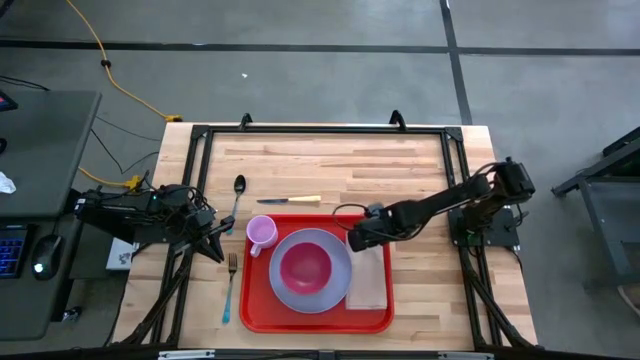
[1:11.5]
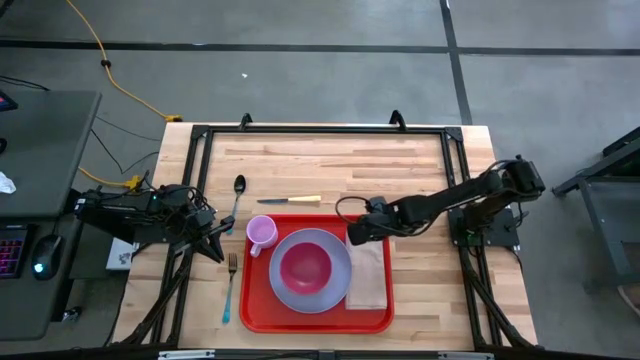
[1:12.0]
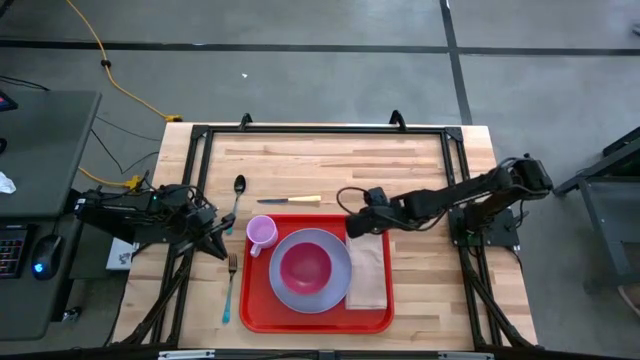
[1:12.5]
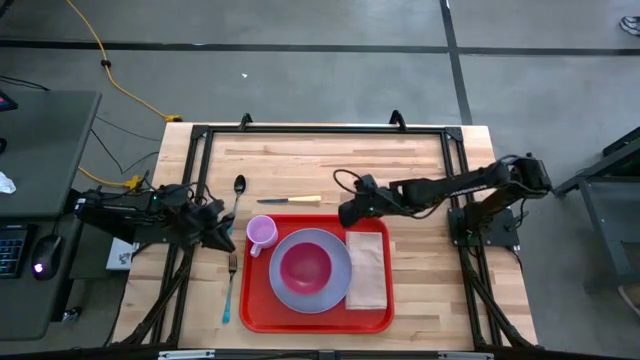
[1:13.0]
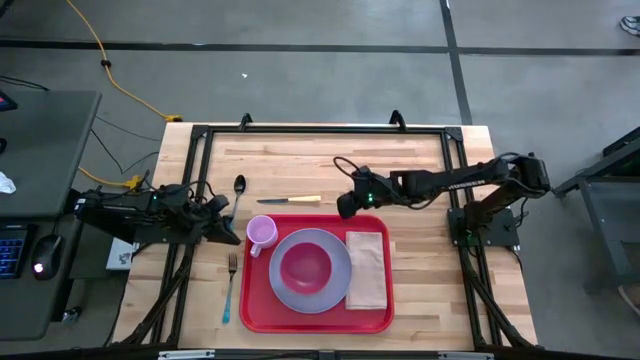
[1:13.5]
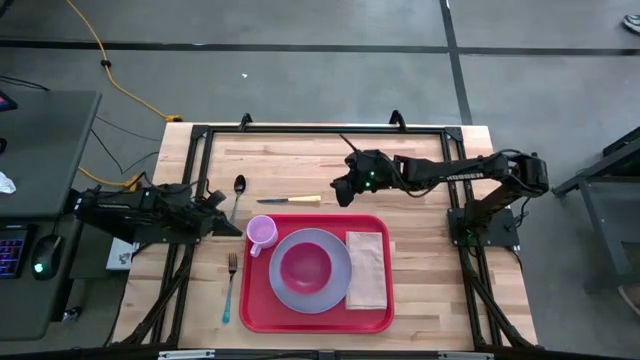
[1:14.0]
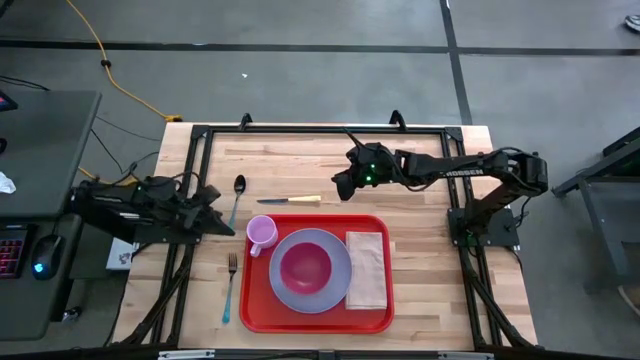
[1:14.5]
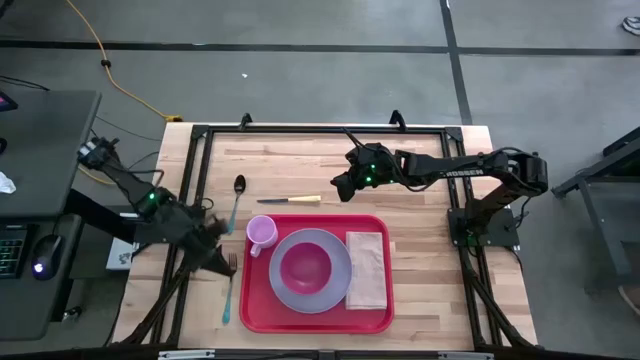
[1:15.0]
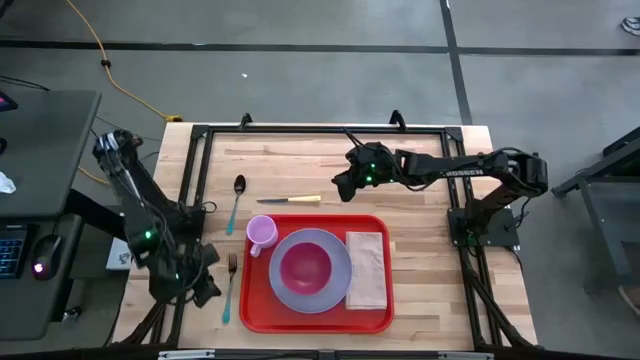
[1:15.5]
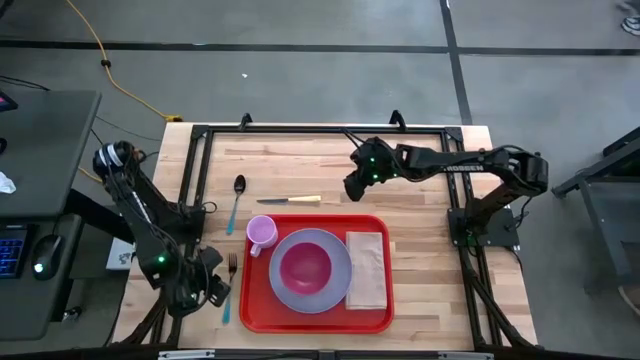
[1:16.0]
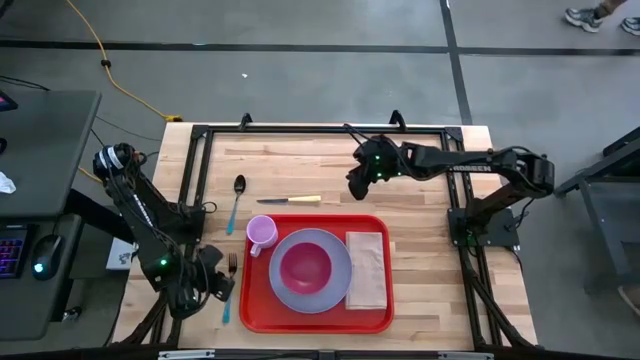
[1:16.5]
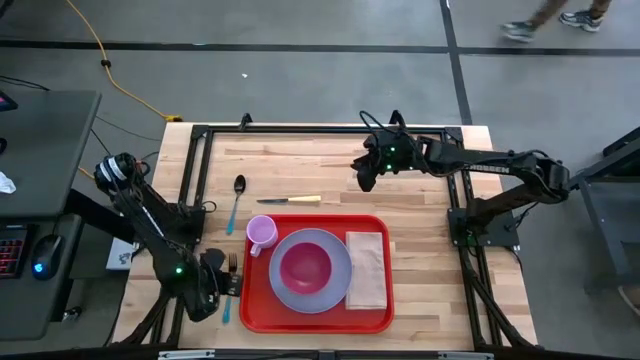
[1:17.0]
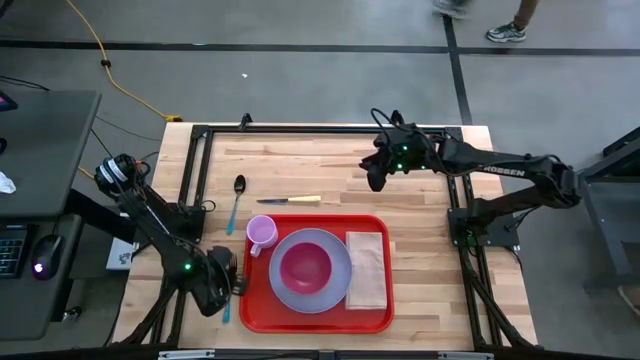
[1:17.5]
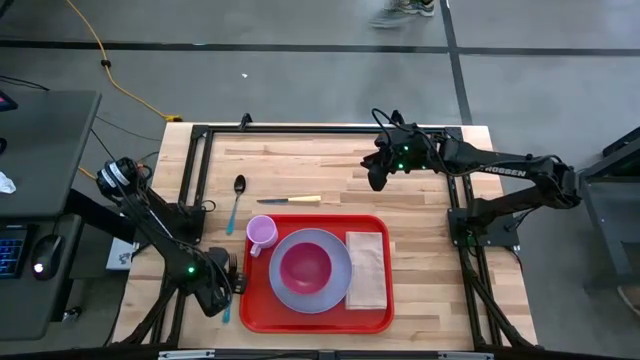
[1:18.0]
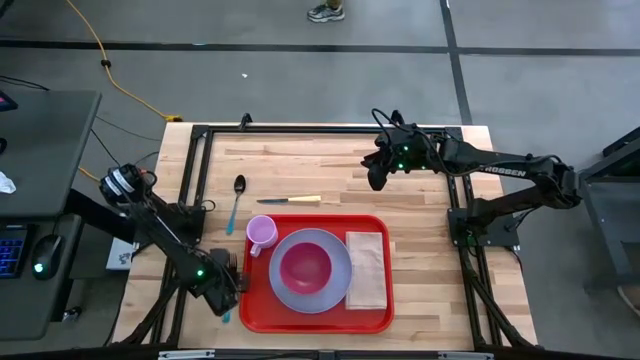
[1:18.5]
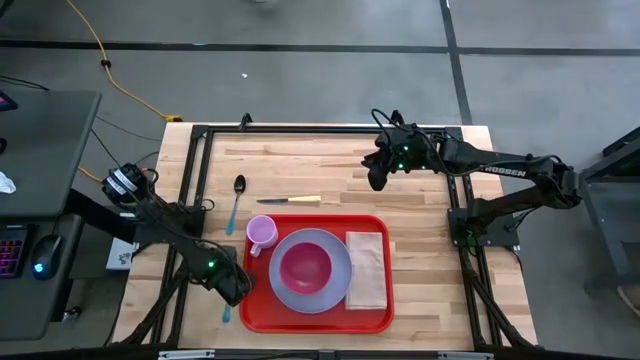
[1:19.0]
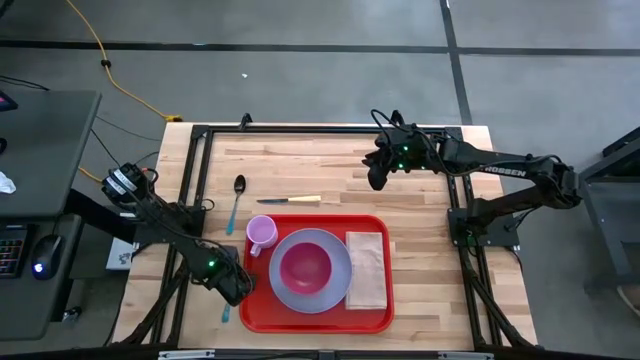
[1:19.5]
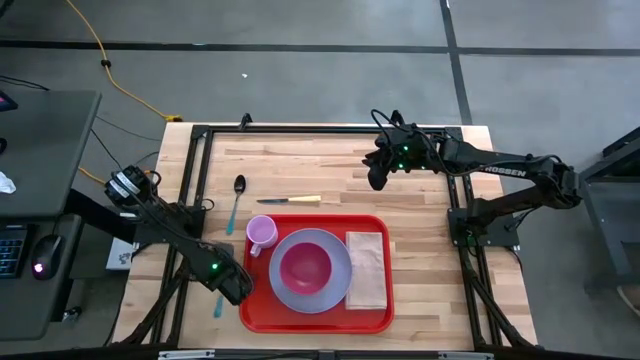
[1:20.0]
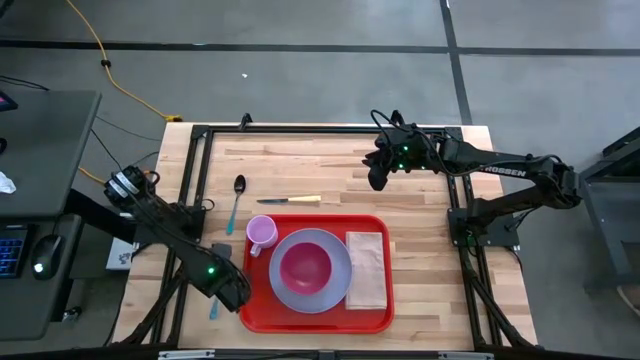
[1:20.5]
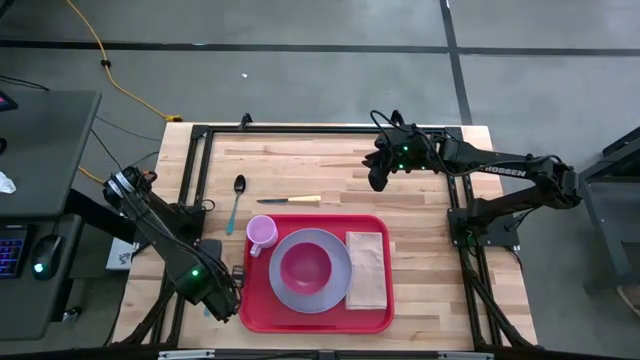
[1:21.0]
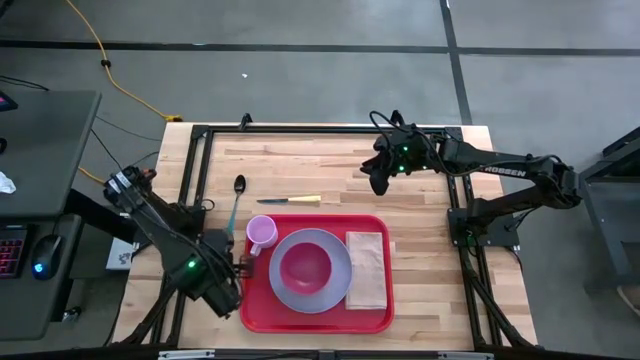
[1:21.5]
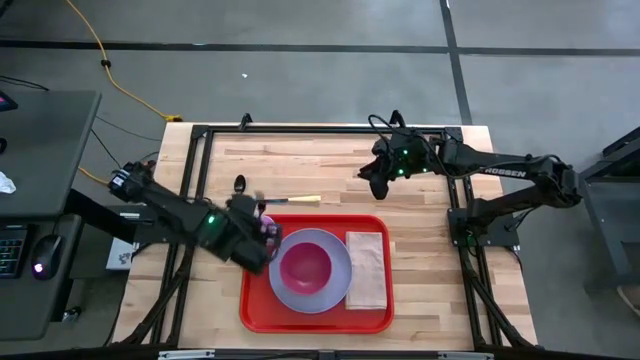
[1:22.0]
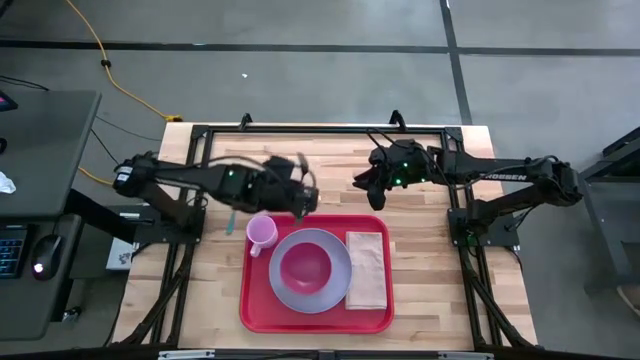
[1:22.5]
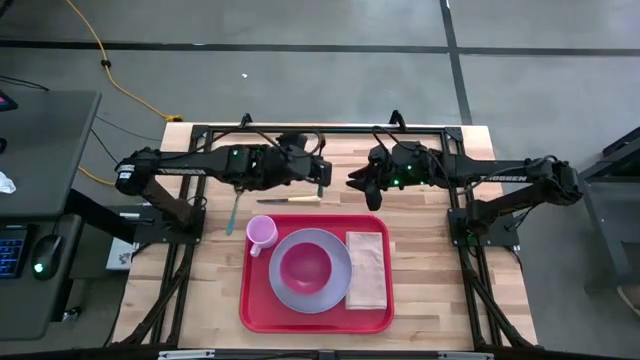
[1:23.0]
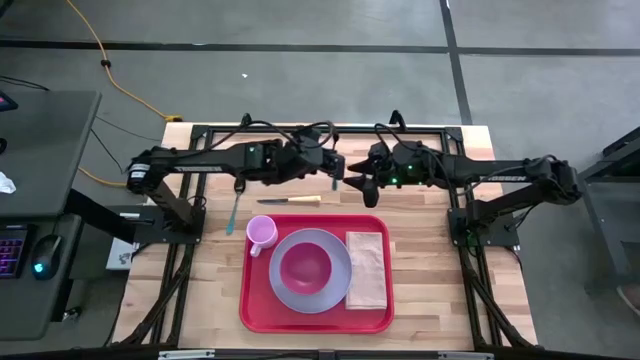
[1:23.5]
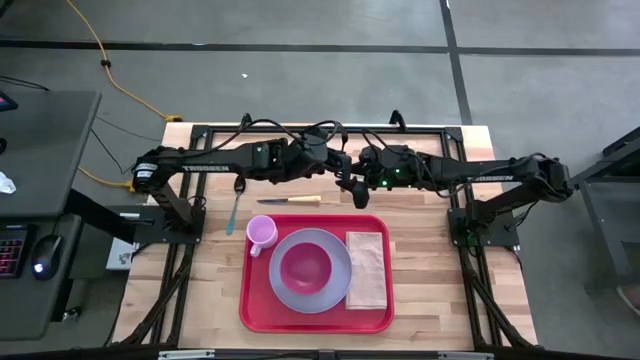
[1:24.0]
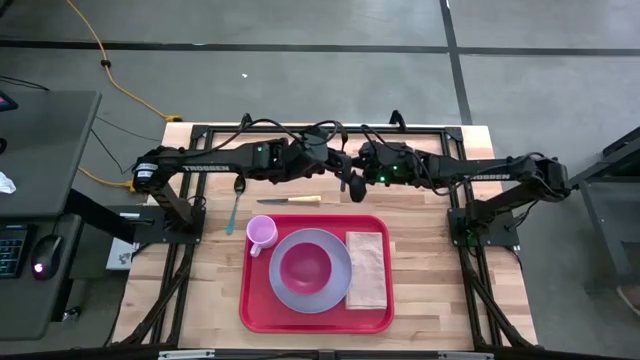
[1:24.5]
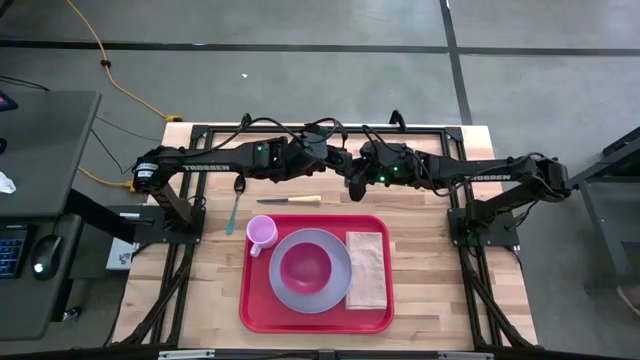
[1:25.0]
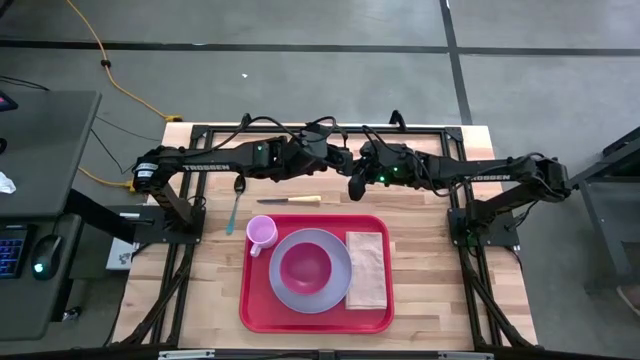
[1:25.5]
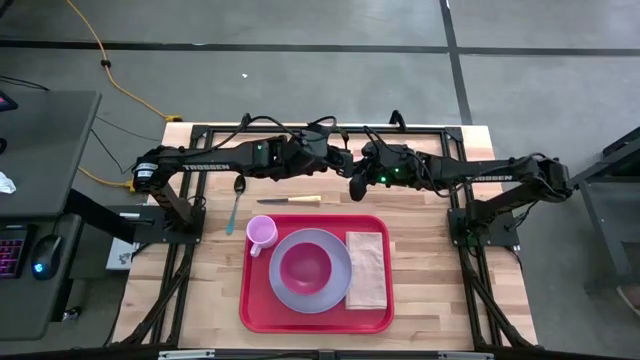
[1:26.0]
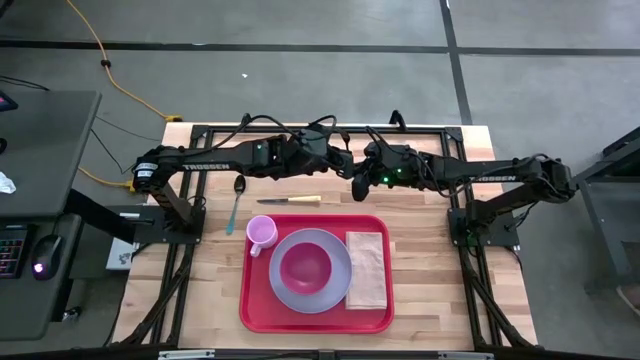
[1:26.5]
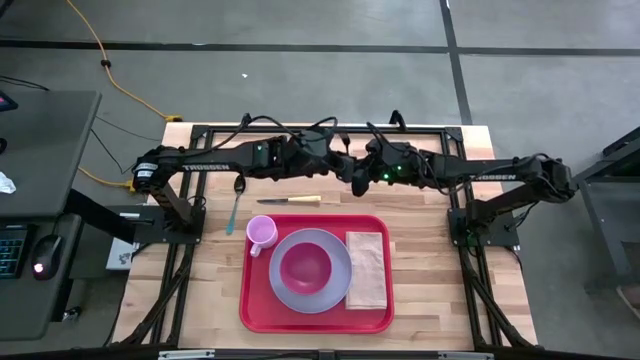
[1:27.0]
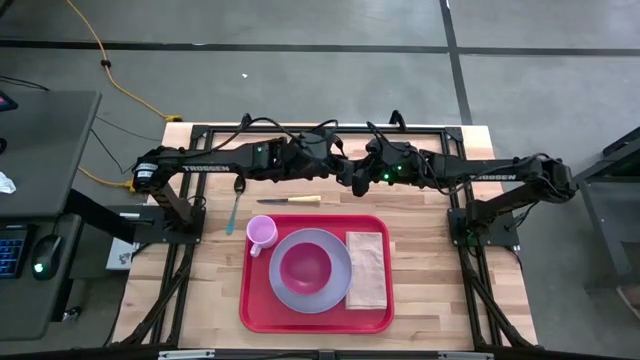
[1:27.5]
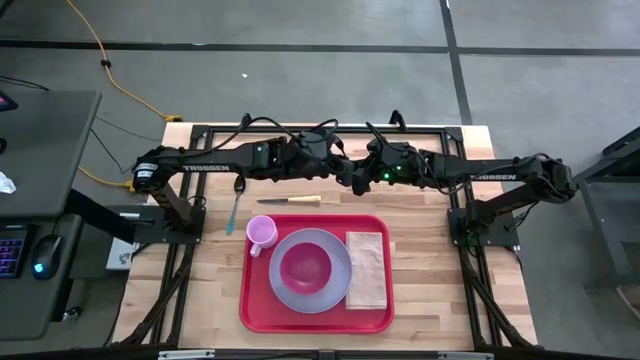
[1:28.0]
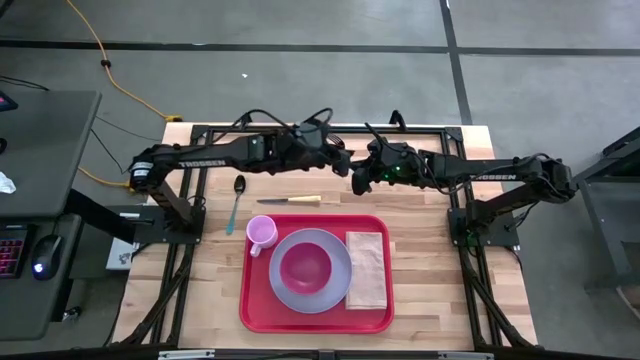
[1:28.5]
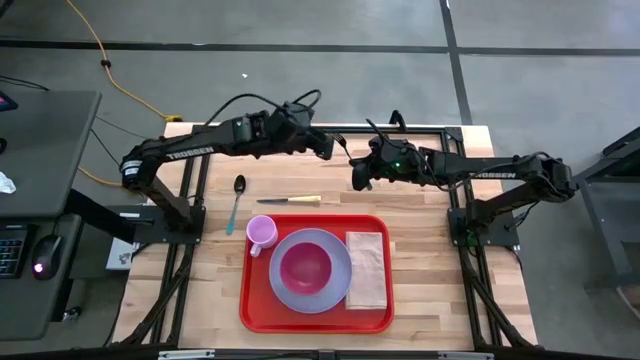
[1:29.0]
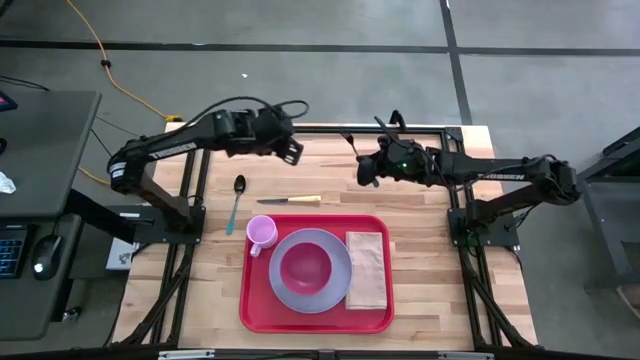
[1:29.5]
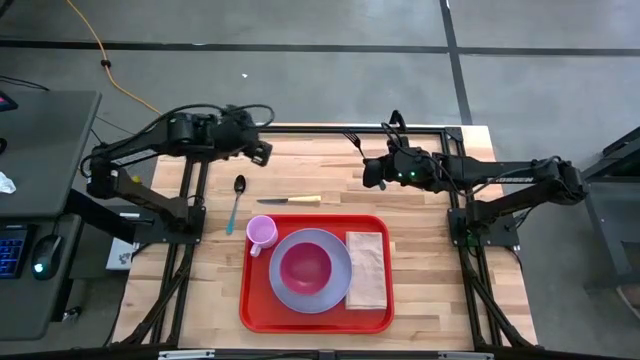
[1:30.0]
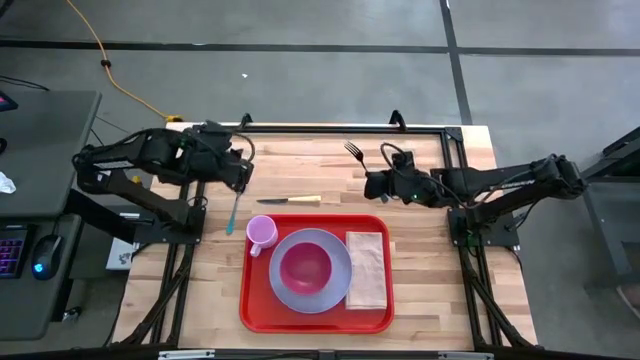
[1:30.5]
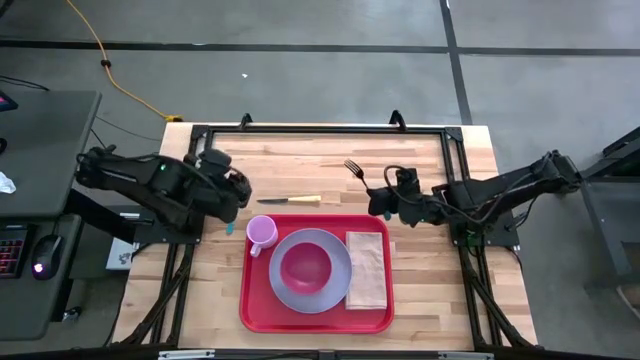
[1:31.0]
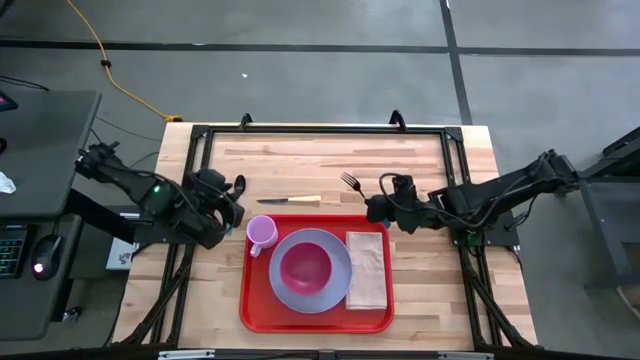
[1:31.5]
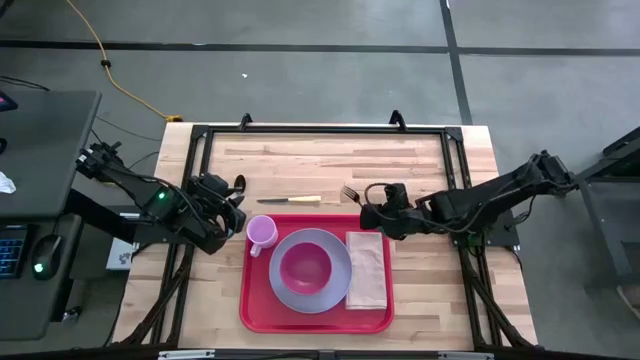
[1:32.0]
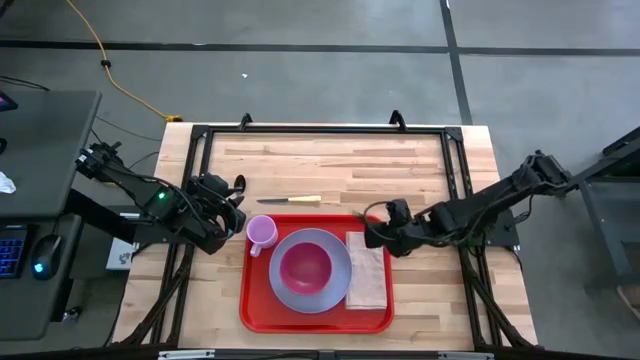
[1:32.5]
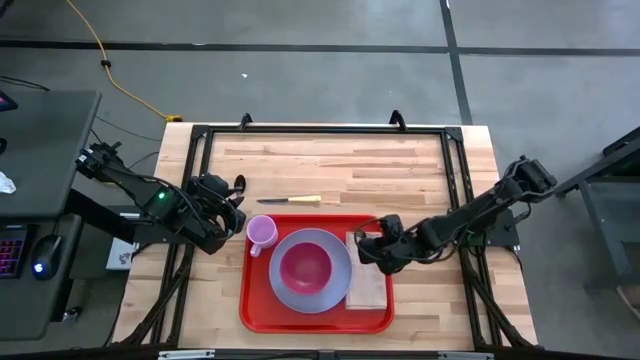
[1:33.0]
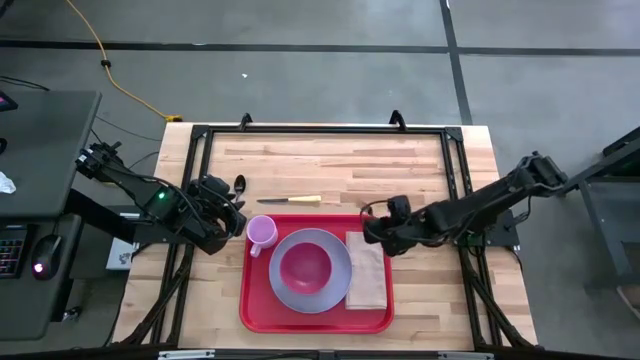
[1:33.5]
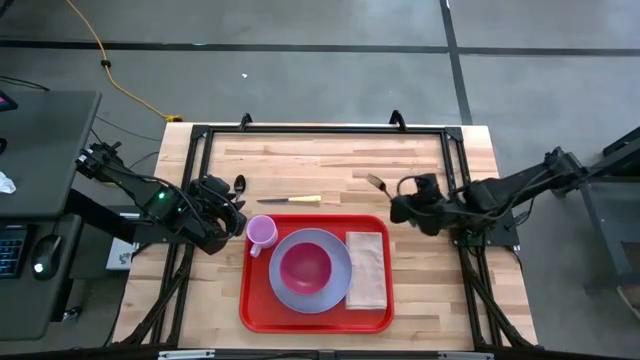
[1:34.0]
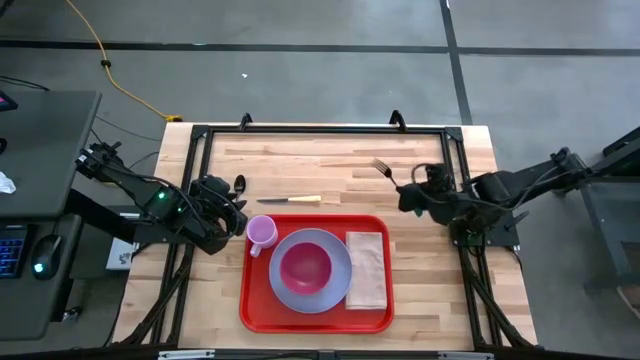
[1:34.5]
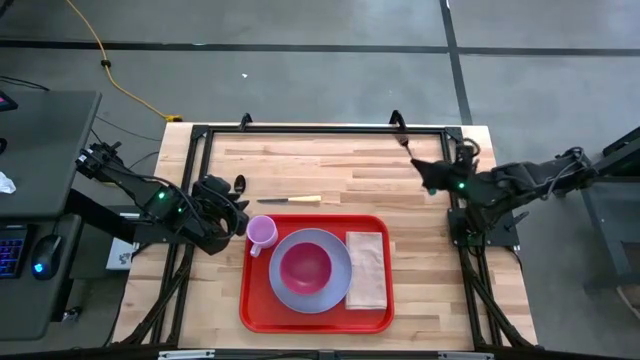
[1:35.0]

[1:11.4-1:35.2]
Task: Set up tray
Put the blue fork on the brown napkin
